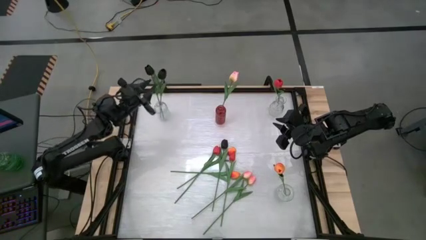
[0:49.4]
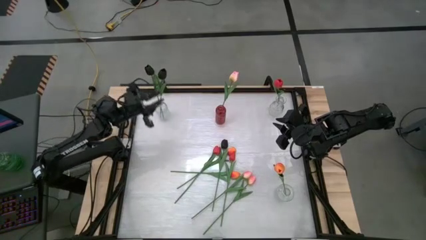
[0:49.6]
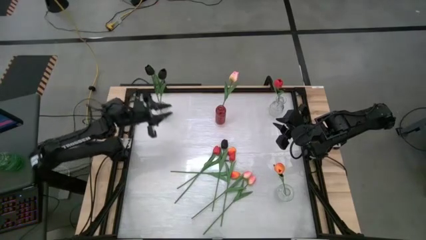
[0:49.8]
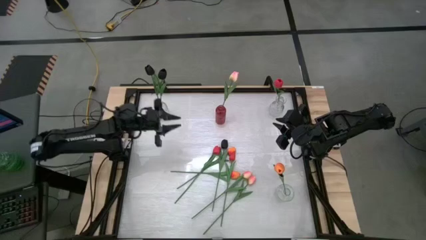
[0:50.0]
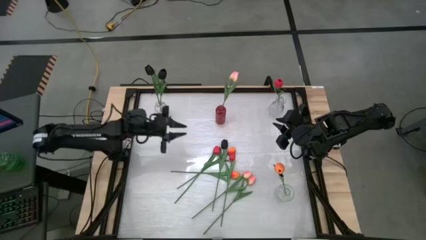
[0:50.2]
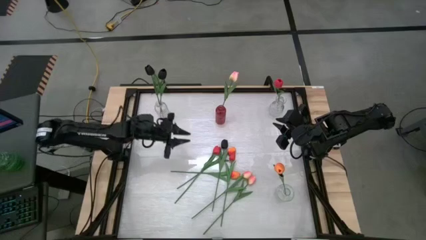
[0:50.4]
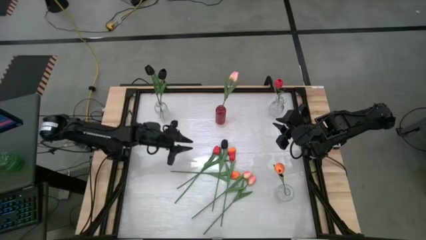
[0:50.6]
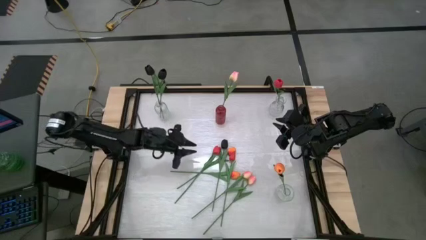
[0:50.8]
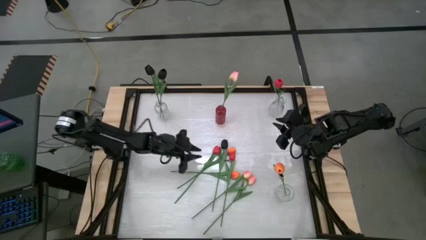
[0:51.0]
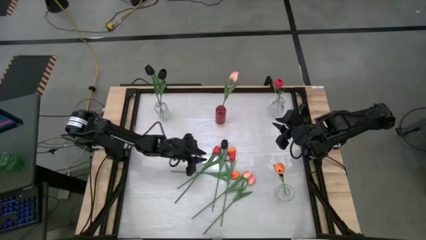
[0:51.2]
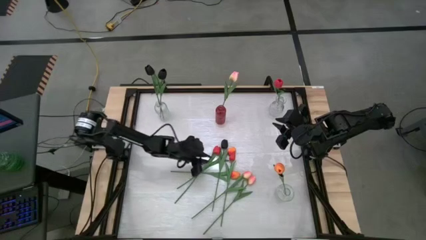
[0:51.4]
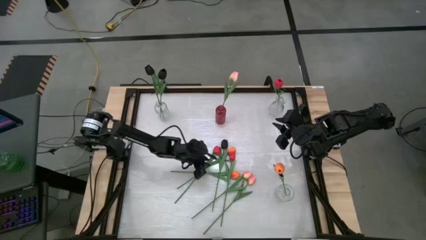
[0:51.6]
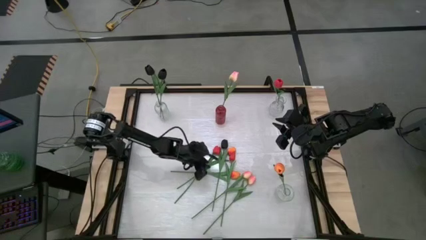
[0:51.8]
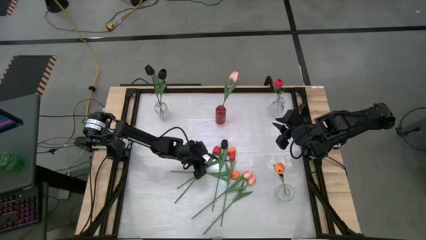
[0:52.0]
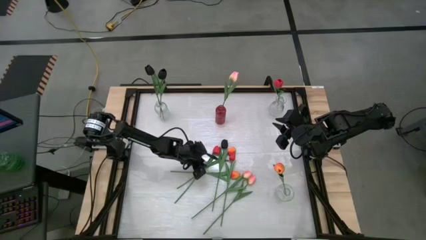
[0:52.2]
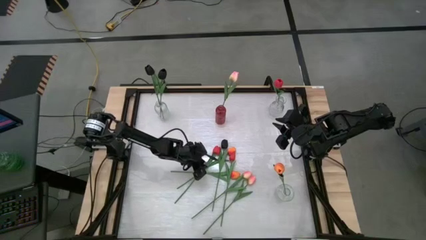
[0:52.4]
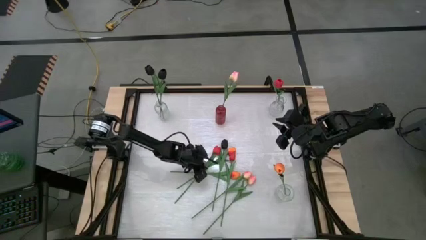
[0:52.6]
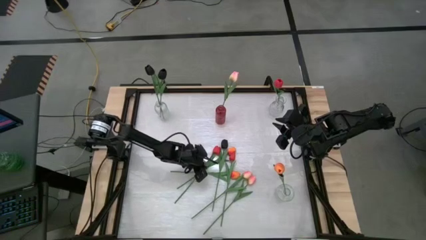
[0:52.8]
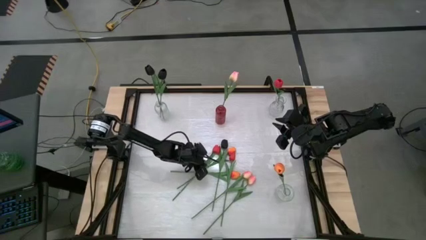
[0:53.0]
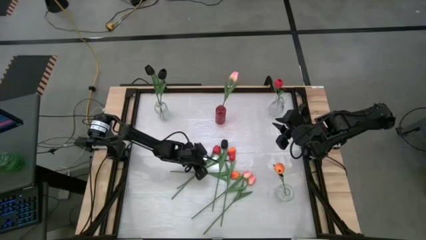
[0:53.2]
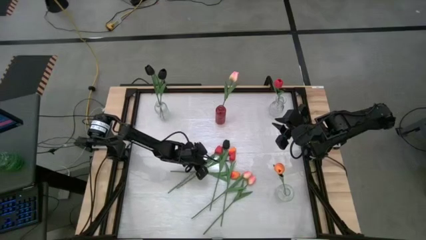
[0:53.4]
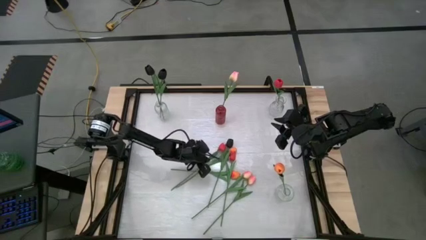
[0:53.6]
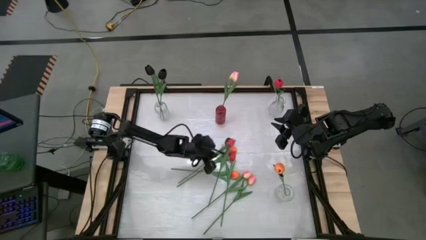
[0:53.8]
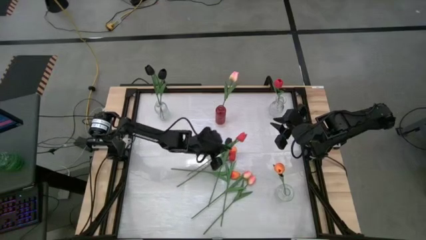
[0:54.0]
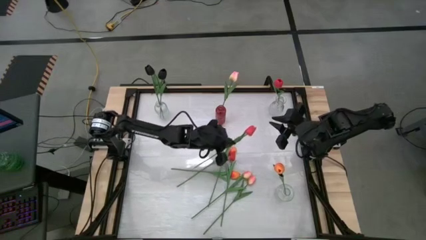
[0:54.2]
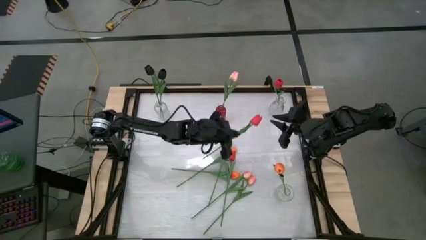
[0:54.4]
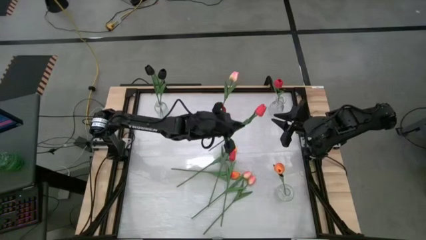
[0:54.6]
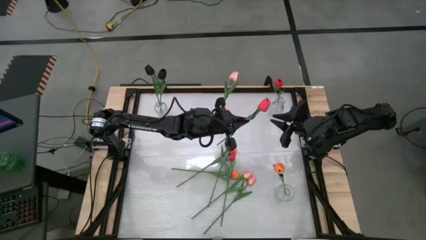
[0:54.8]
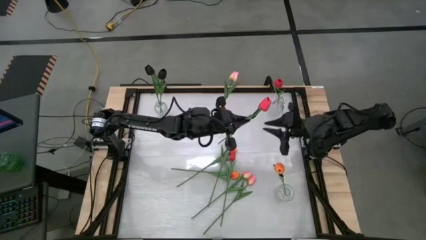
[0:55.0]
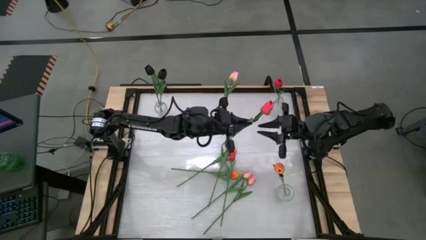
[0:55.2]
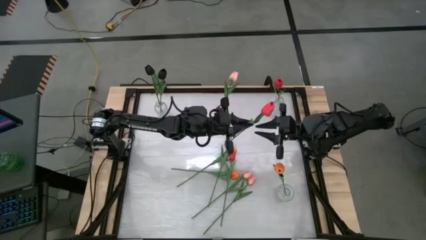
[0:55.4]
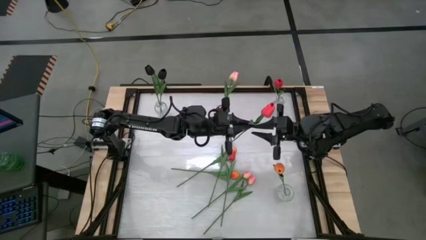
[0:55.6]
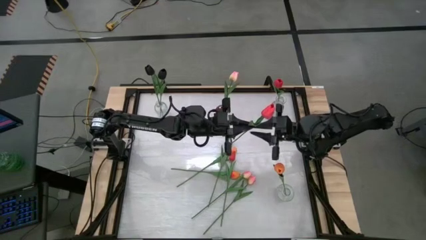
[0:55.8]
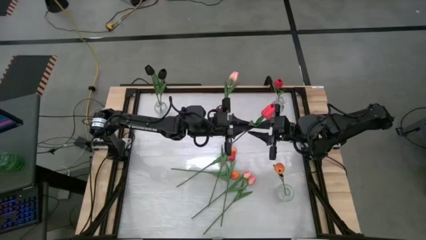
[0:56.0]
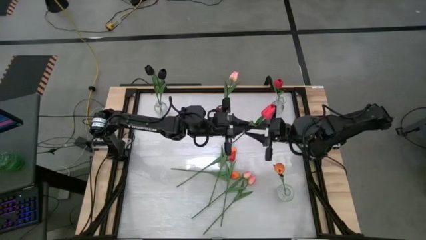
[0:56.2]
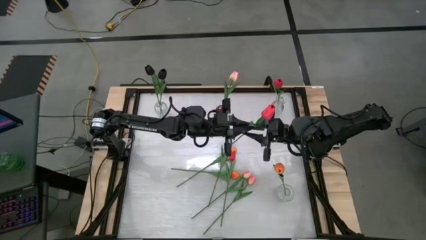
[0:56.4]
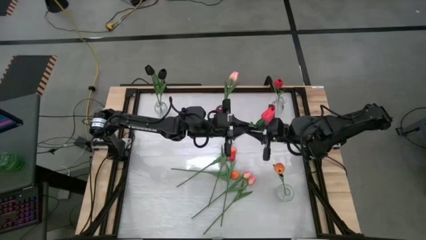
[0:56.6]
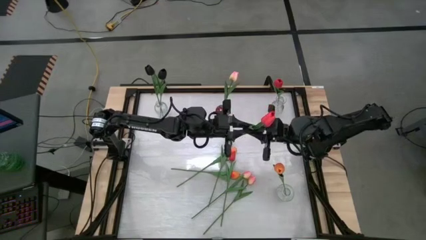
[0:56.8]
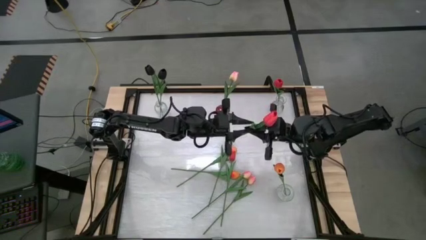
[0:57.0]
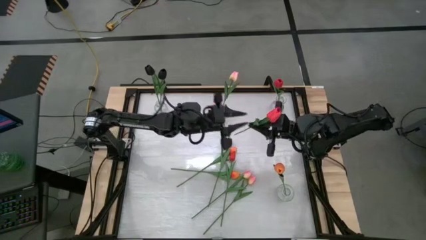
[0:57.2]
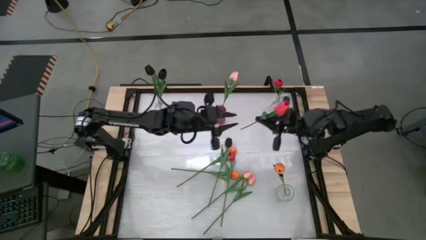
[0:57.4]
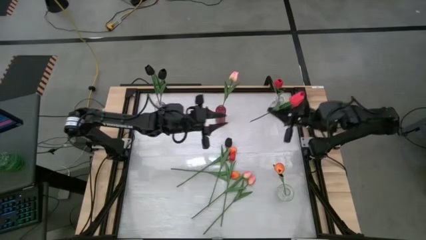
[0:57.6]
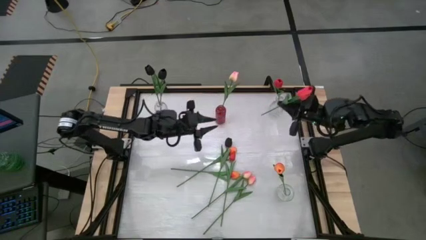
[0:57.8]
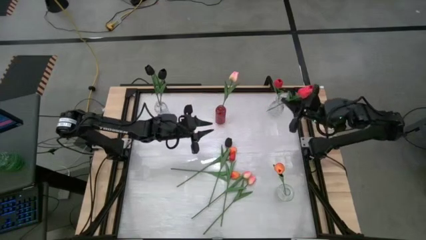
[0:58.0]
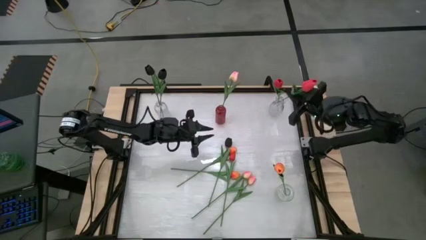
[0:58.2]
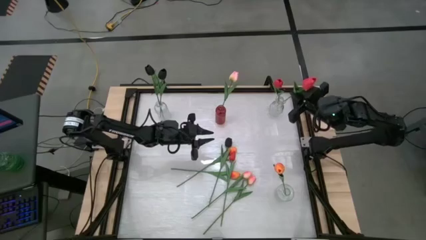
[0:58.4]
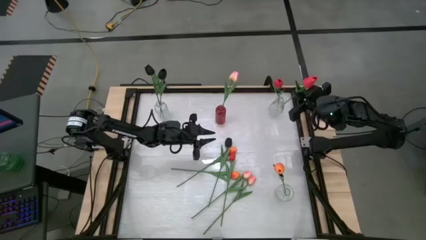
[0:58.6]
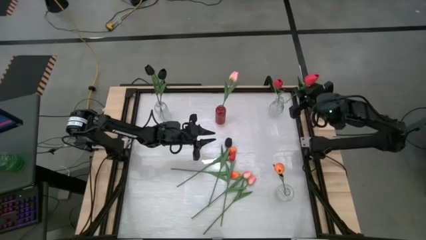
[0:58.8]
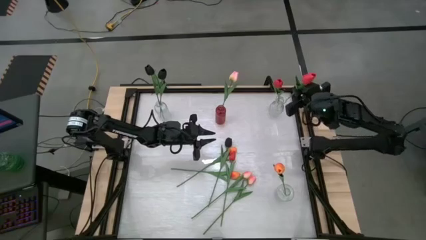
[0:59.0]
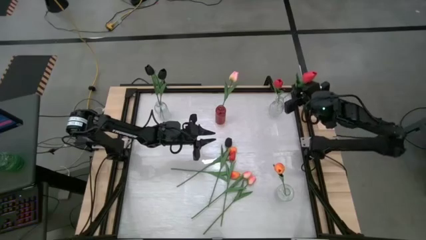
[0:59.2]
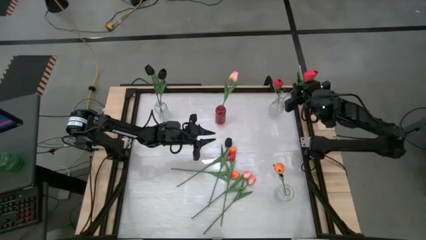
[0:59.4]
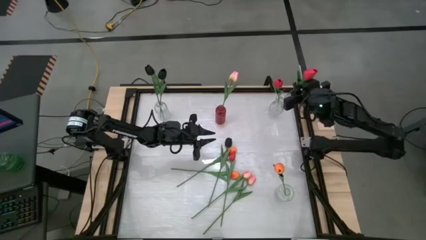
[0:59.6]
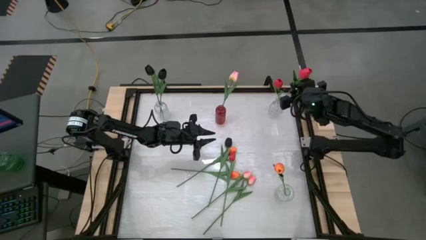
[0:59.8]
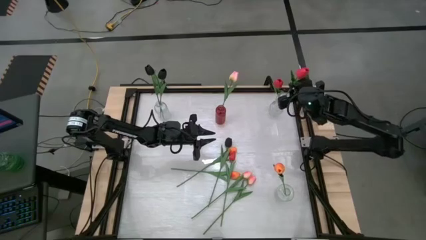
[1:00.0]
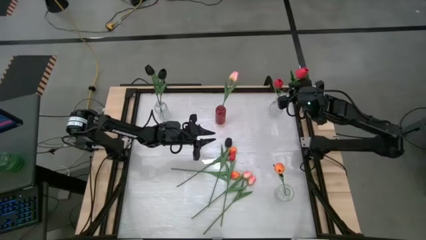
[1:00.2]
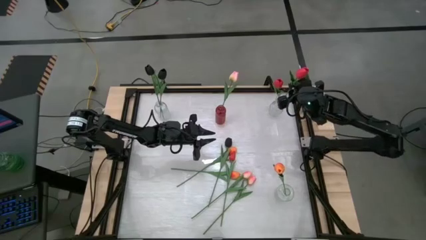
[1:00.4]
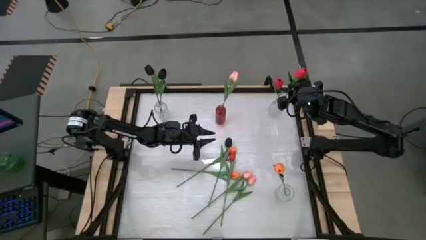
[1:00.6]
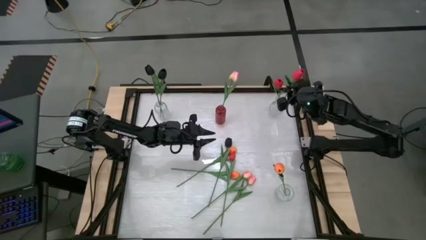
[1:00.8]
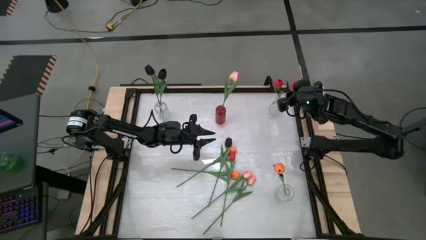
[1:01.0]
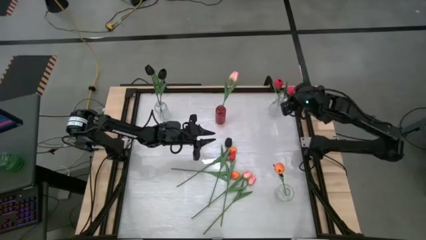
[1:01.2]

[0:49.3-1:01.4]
Task: Sort flowers into vase by color
Put the left red flower into the top right transparent vase
